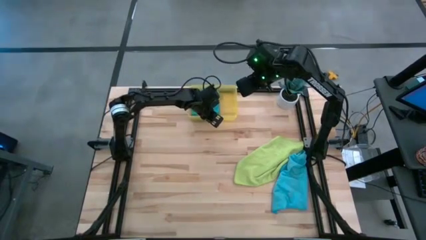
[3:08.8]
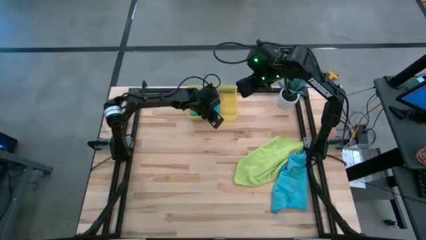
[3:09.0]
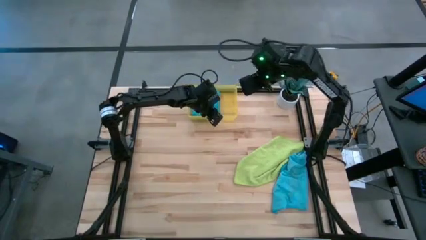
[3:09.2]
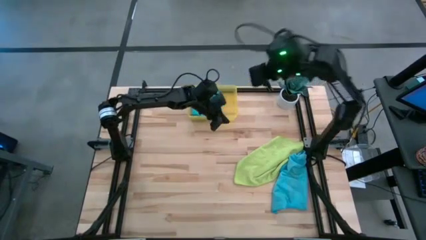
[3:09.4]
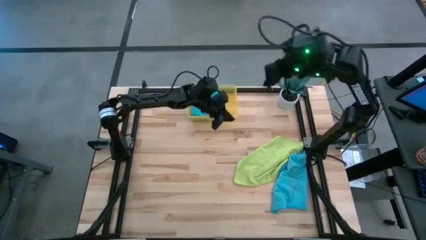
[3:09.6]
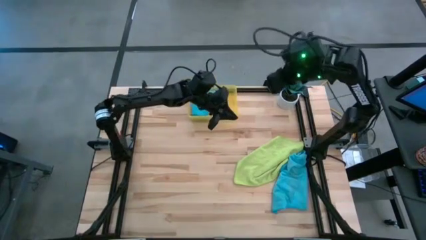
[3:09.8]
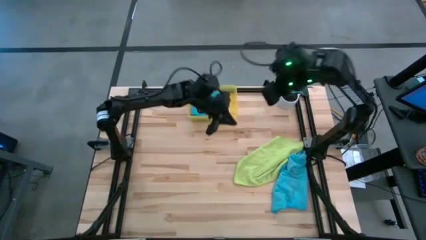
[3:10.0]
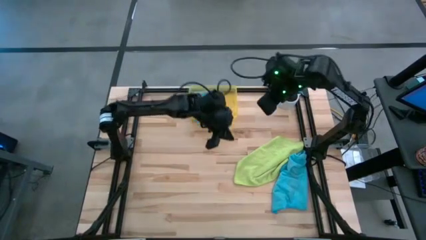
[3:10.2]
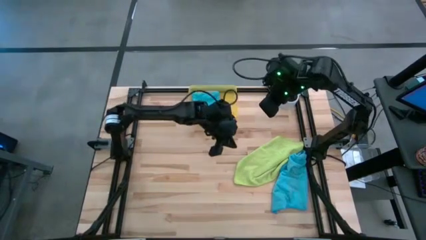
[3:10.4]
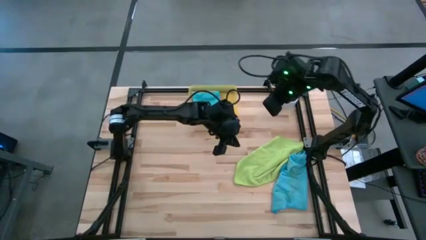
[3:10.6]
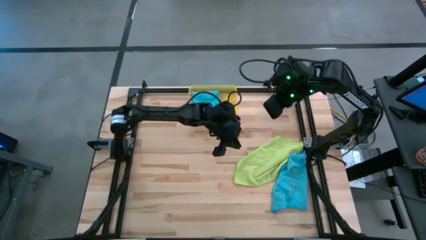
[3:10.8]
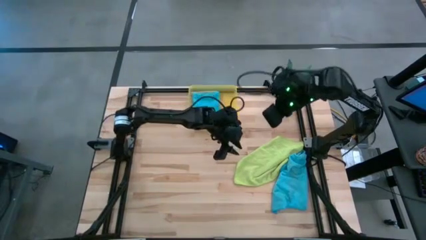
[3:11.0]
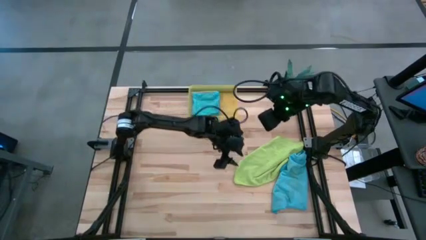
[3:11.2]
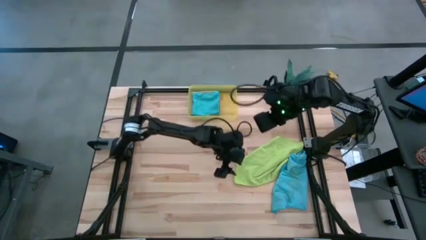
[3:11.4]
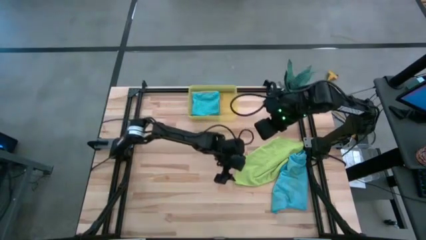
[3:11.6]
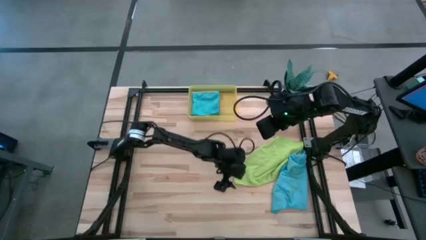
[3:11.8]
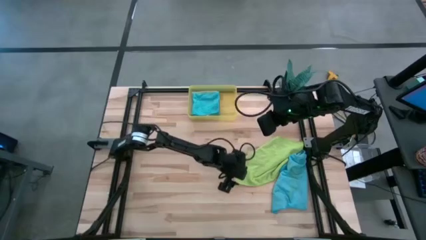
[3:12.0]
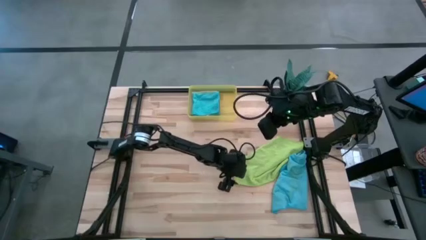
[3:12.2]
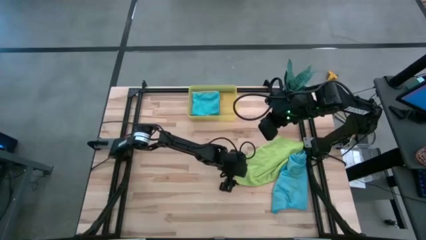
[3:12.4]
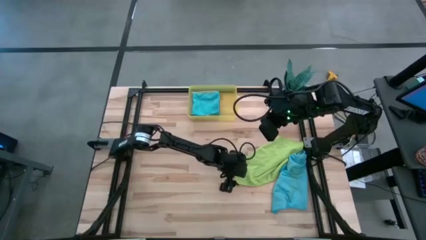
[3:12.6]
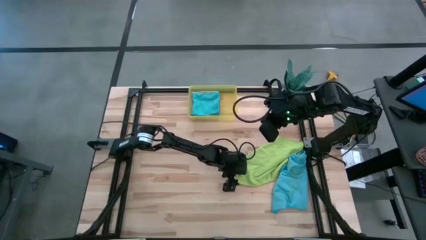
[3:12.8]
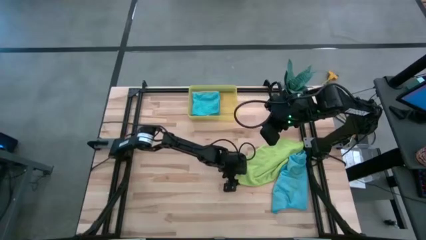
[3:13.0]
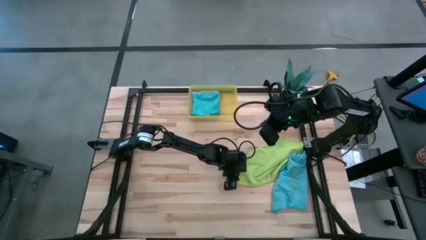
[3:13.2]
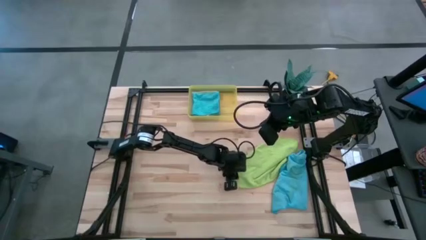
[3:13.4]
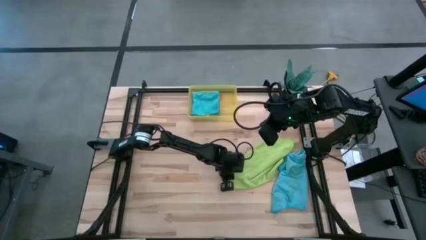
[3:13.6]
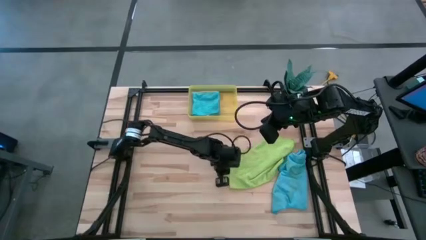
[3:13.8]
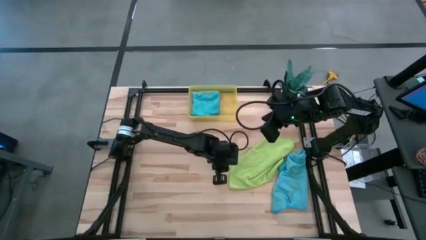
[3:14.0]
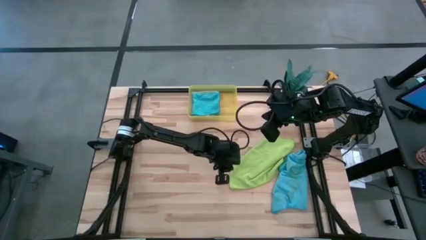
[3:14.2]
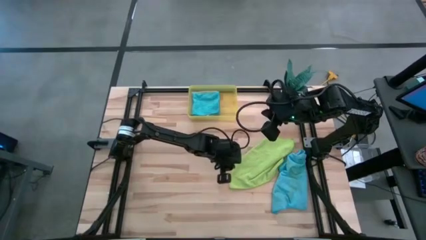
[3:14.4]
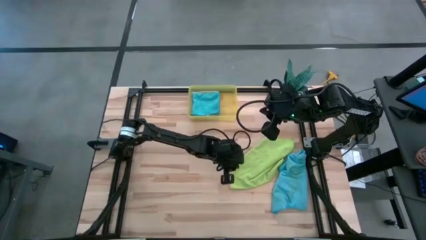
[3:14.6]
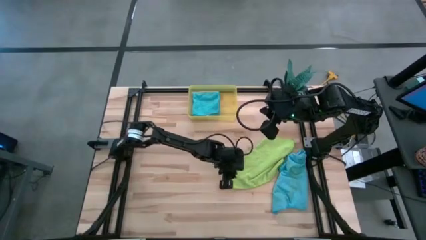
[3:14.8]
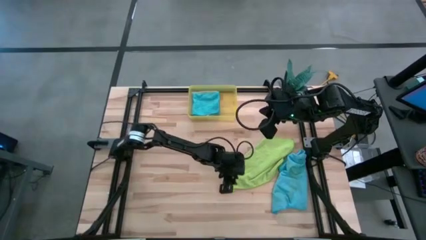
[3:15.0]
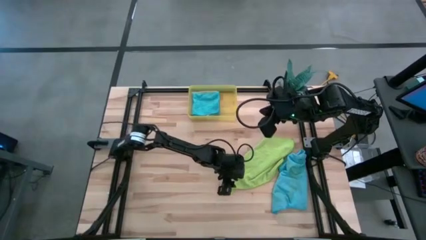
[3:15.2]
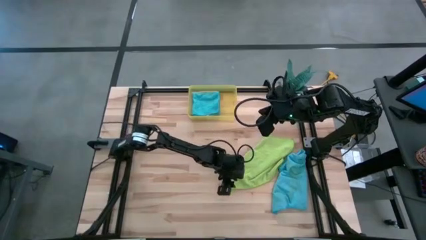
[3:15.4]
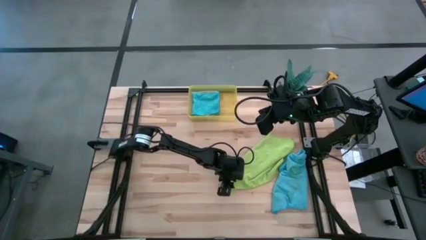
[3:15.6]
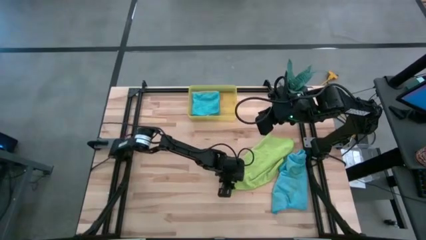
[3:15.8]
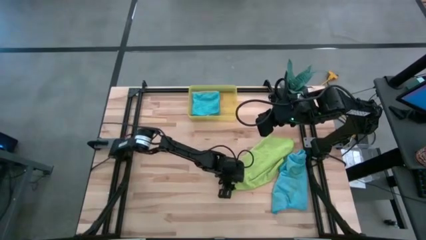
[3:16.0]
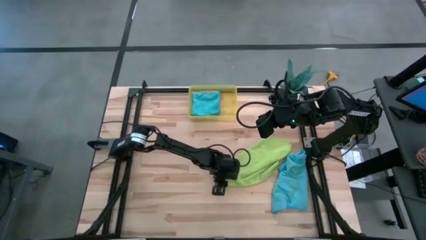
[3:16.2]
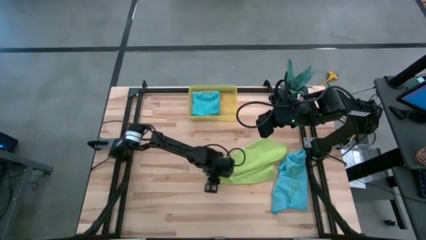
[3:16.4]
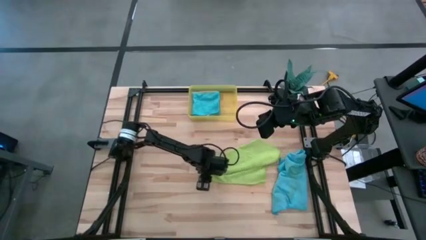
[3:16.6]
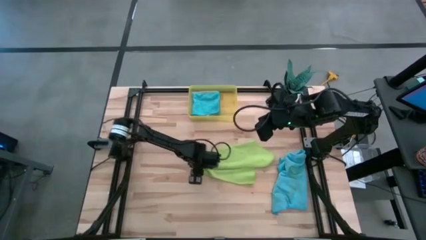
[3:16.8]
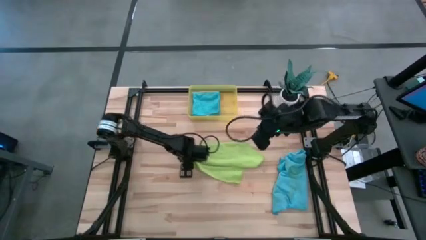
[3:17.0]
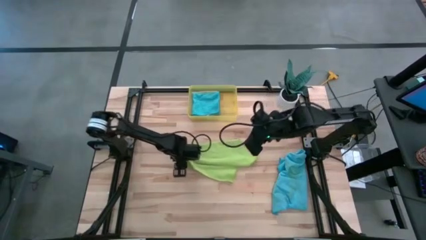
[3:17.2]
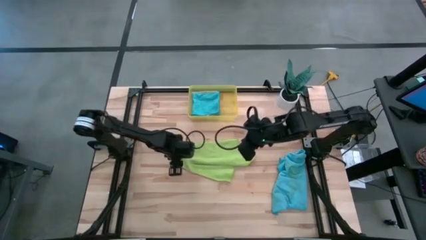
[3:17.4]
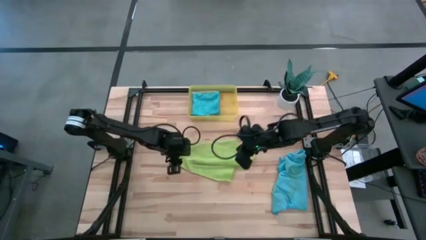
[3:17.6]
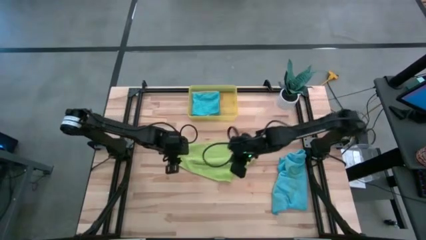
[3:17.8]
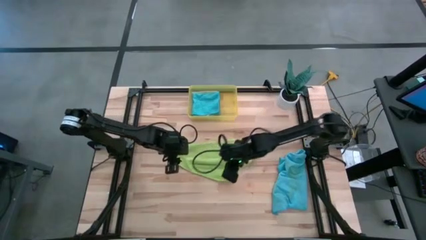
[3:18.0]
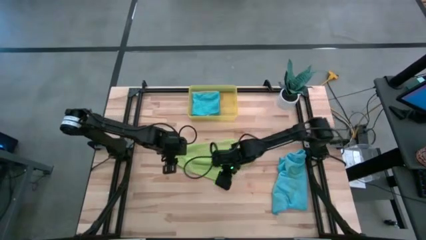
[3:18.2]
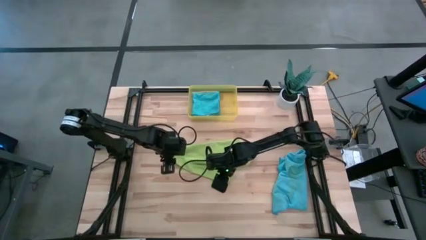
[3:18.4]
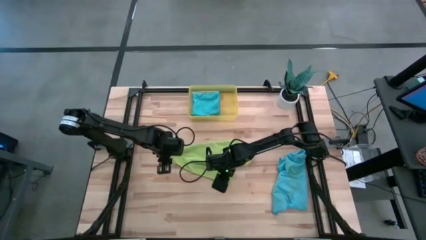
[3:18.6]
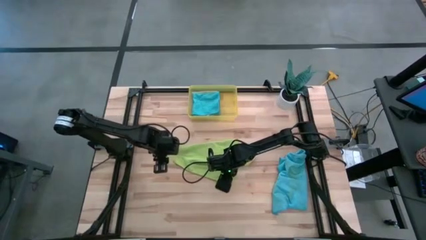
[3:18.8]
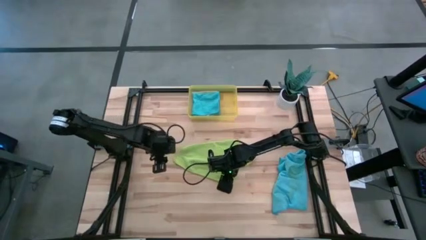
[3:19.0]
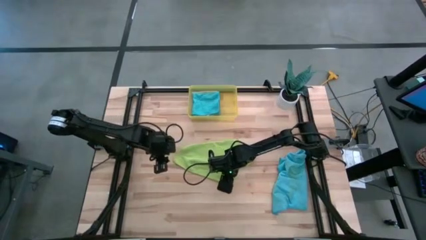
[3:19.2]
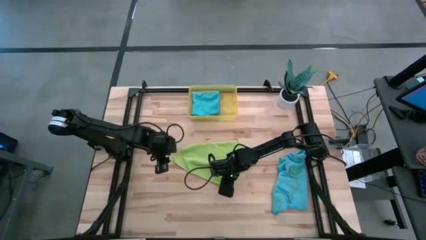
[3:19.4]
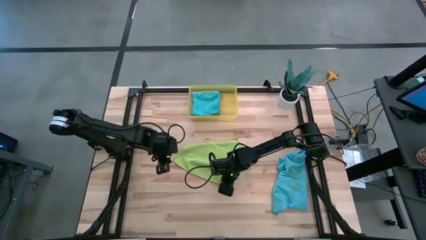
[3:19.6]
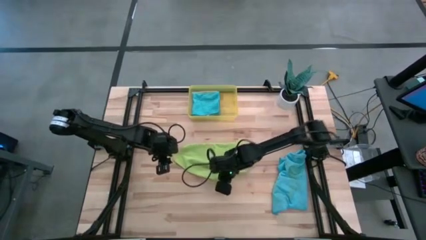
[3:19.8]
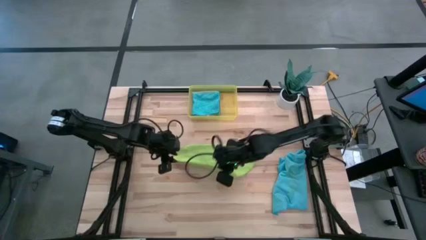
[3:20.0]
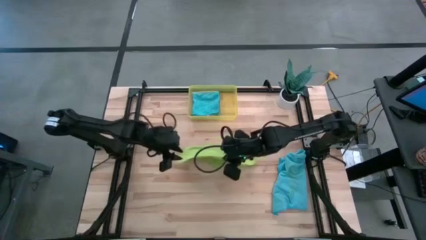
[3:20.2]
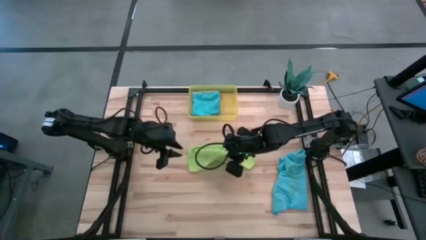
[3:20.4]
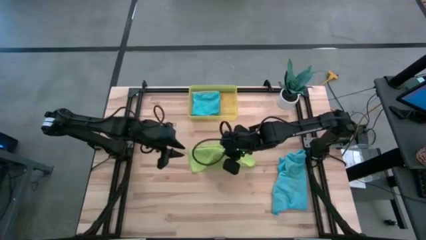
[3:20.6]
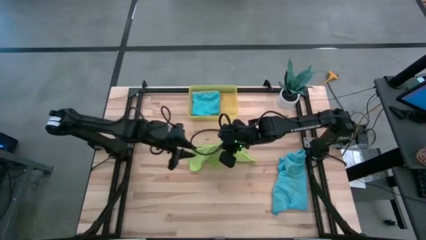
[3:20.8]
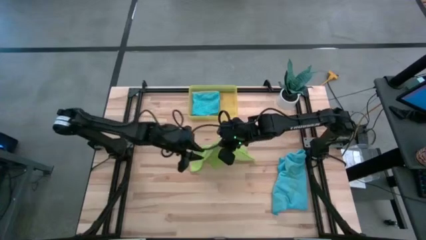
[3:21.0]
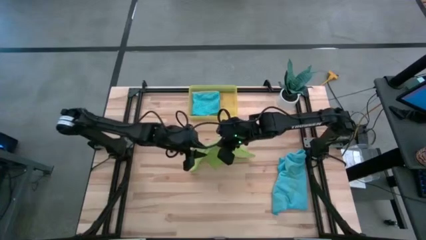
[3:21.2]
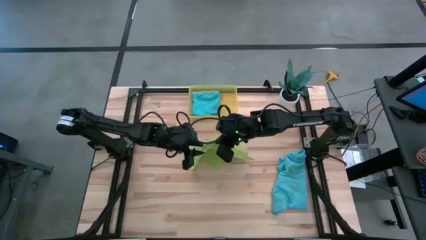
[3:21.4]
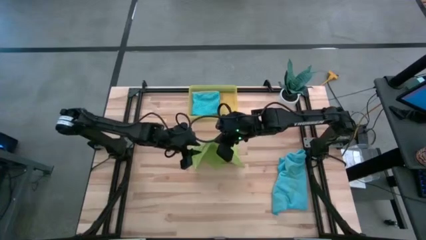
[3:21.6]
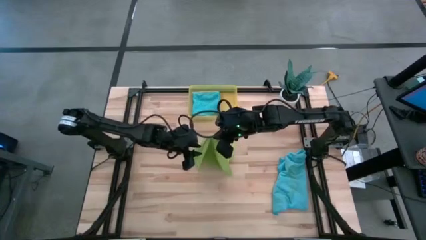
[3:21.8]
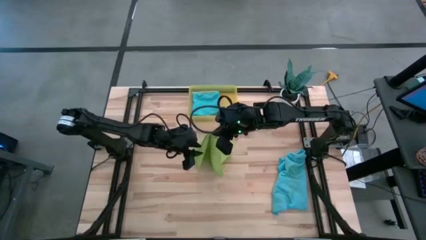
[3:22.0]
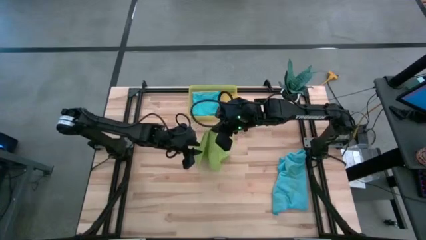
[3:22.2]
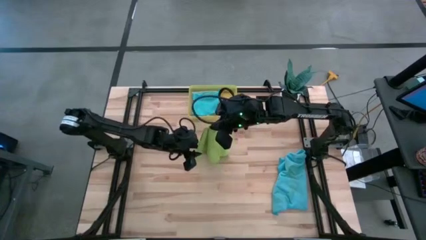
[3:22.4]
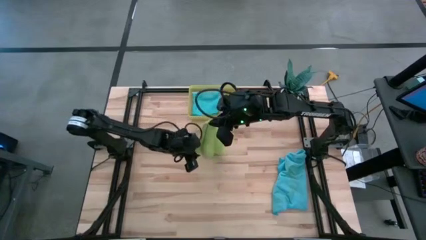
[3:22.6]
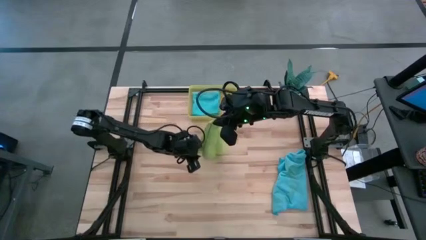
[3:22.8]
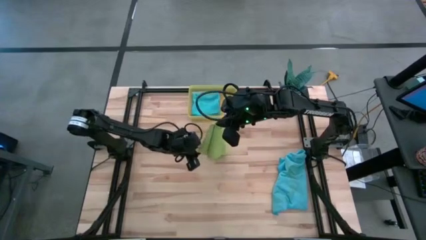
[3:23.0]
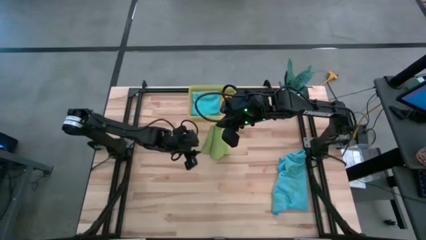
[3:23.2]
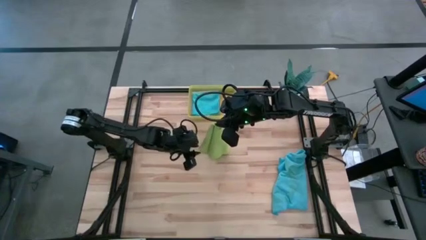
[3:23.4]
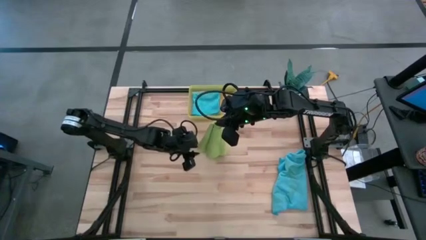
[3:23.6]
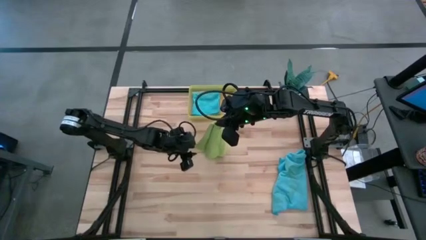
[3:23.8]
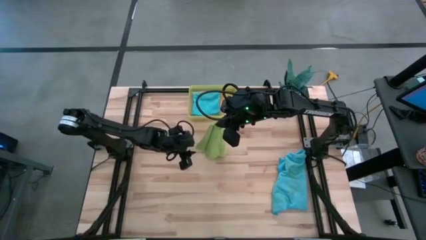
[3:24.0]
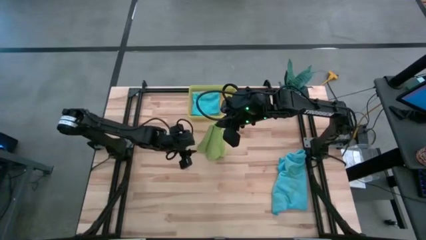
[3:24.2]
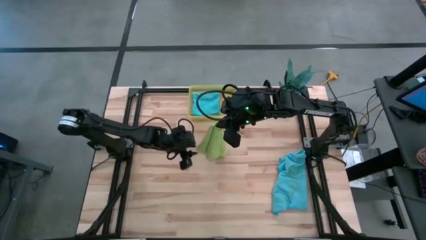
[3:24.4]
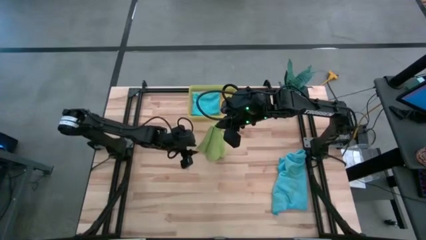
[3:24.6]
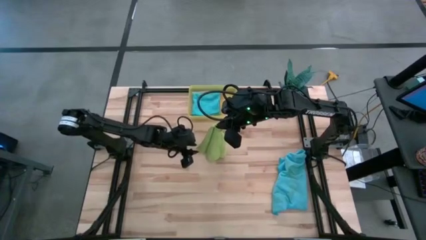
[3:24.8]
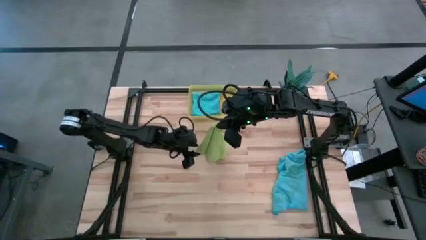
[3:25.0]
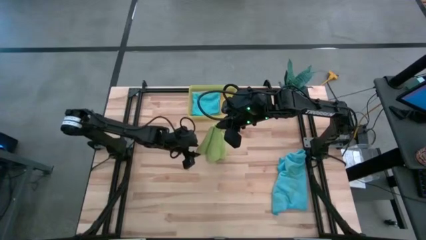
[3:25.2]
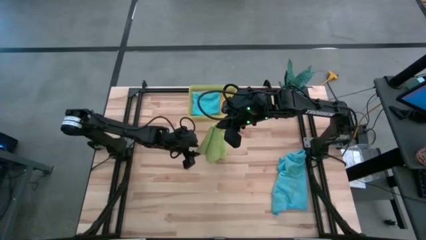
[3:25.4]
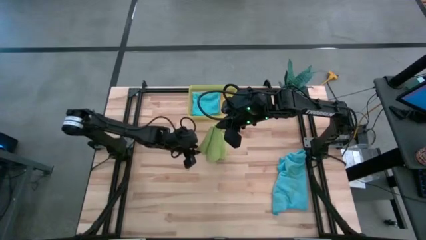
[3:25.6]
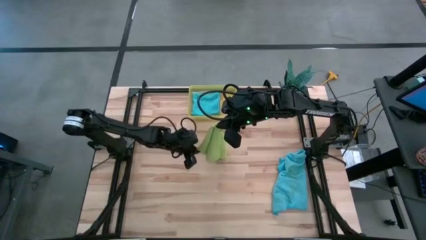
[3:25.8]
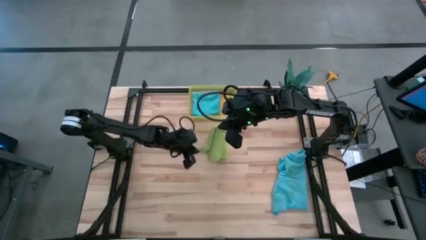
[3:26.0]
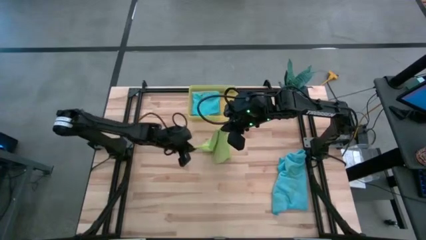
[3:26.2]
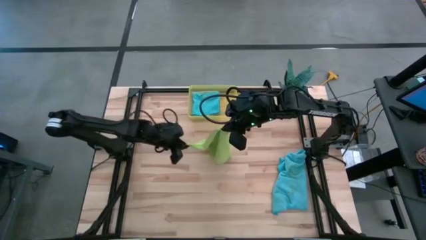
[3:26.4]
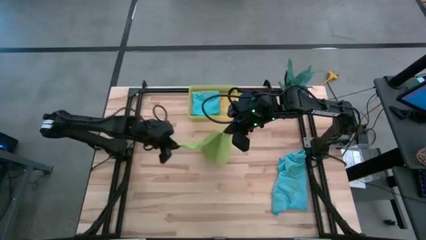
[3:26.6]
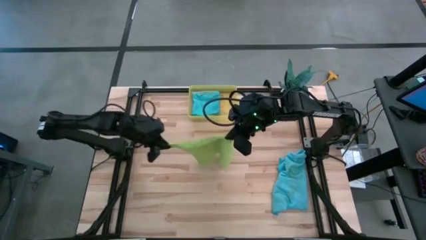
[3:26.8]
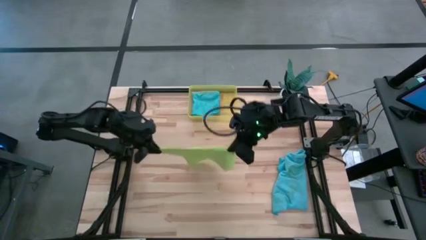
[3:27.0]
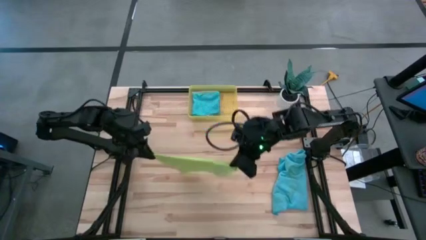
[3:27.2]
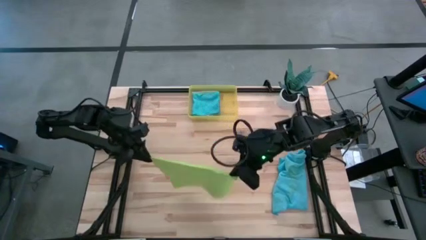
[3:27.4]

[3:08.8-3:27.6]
Task: Fold microfiber towels
Fold the green microfiber cloth
